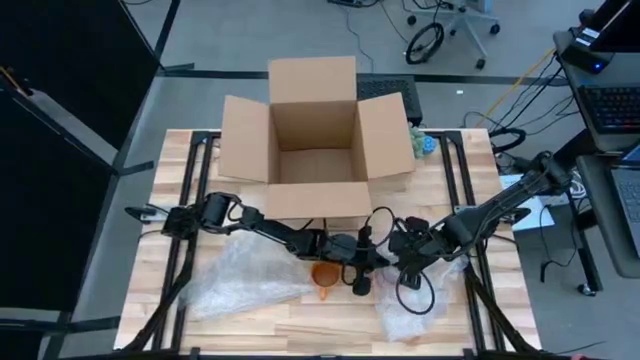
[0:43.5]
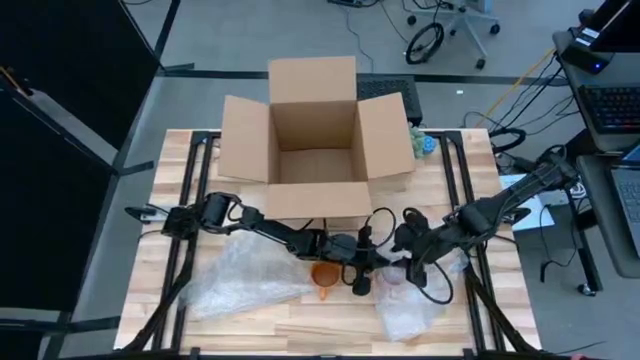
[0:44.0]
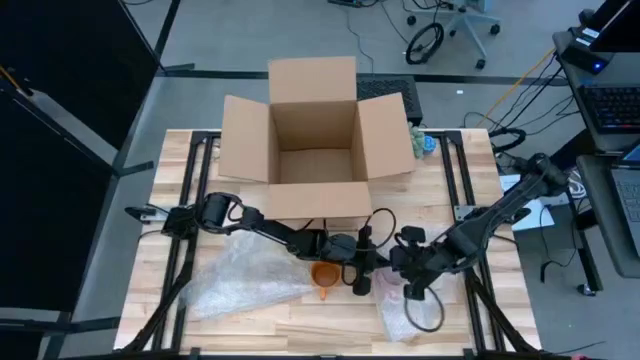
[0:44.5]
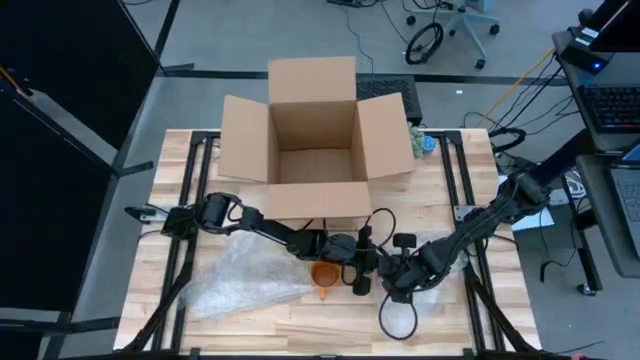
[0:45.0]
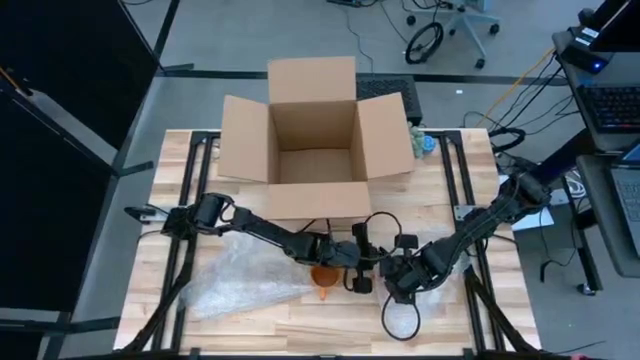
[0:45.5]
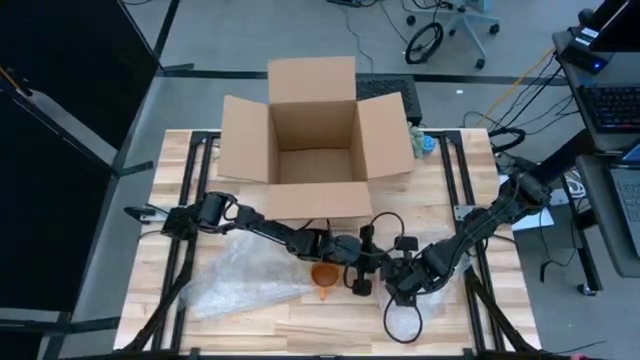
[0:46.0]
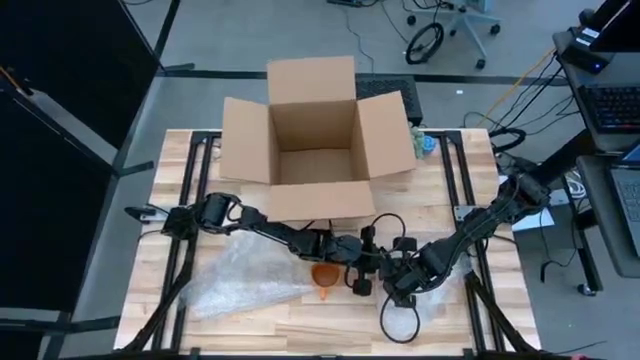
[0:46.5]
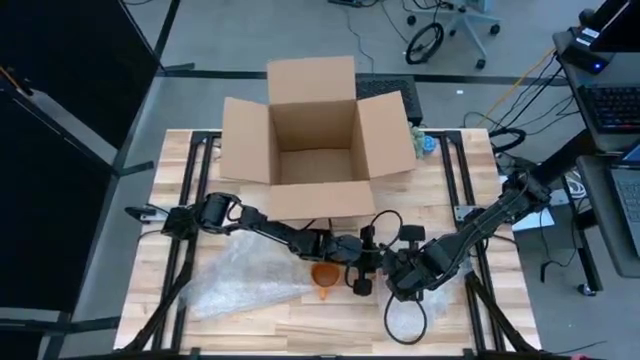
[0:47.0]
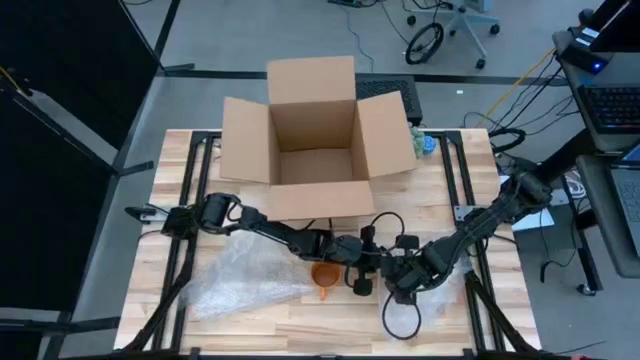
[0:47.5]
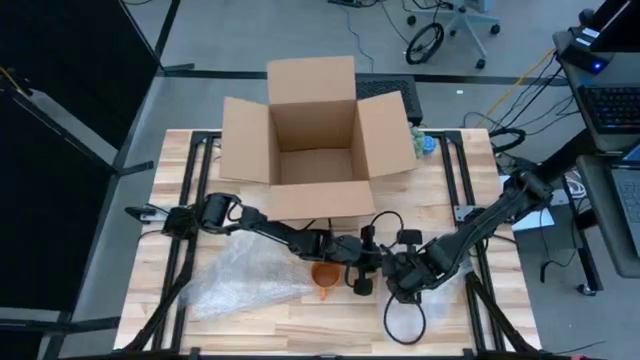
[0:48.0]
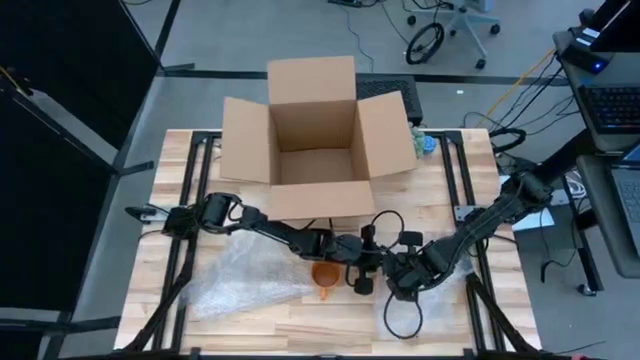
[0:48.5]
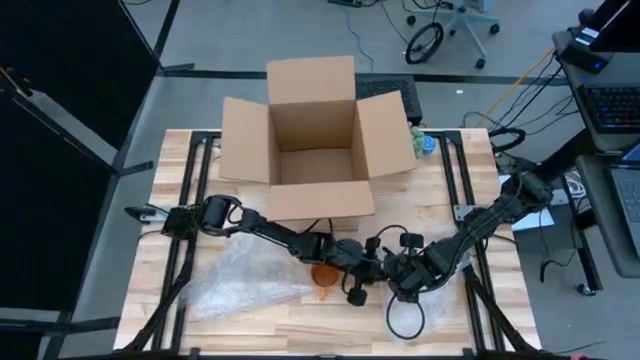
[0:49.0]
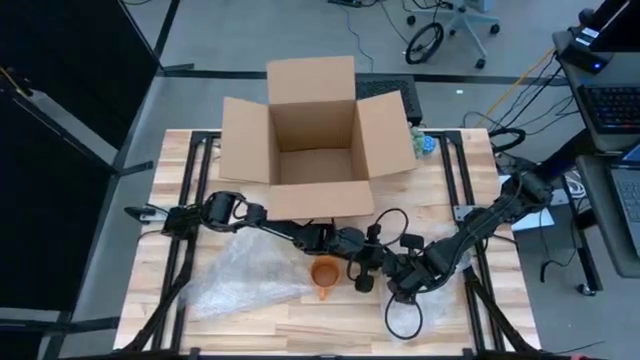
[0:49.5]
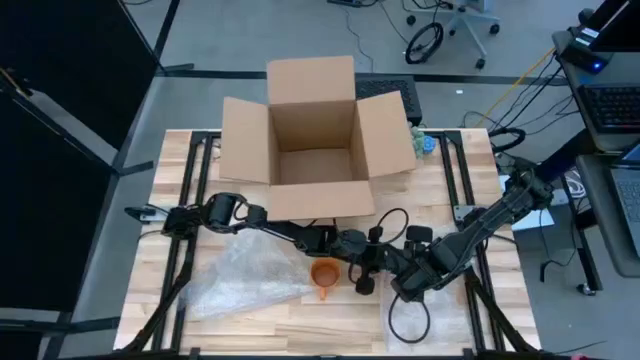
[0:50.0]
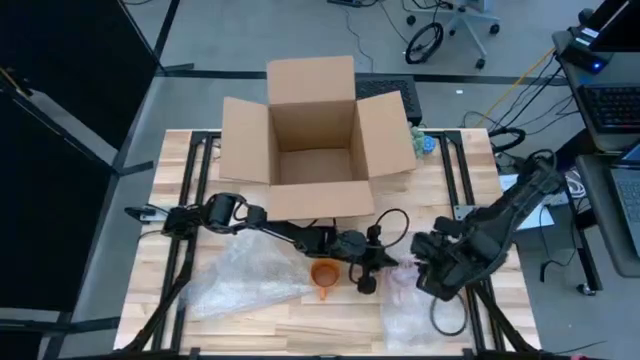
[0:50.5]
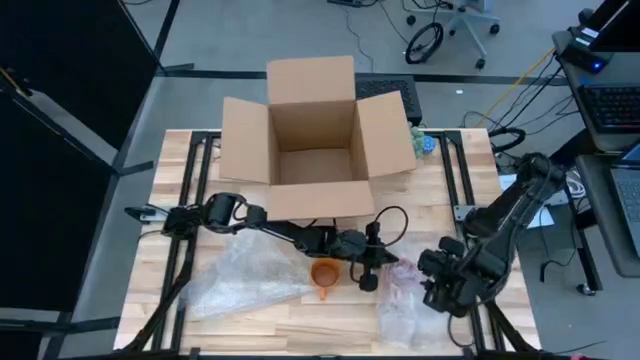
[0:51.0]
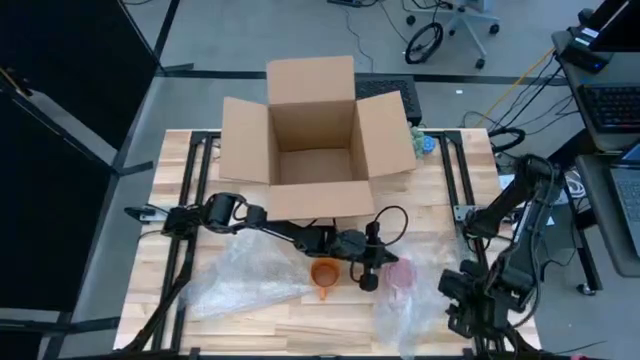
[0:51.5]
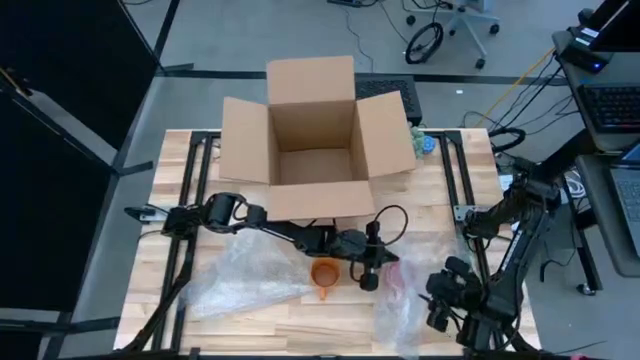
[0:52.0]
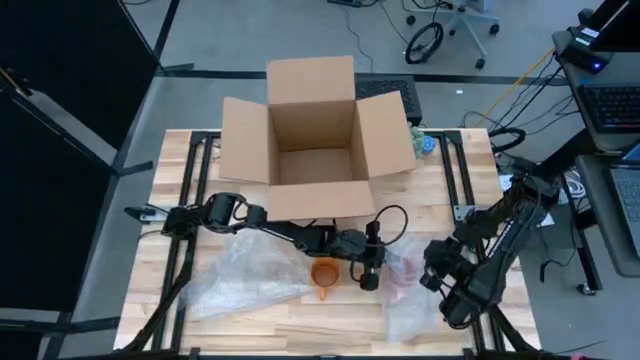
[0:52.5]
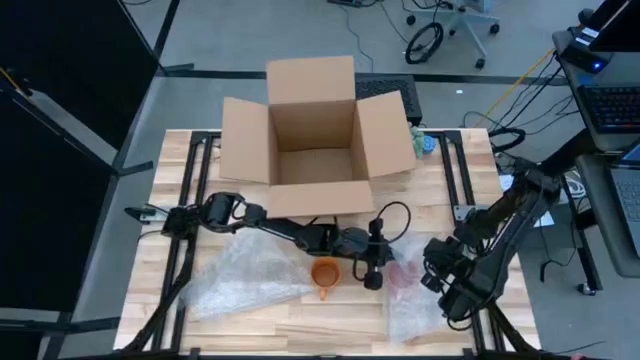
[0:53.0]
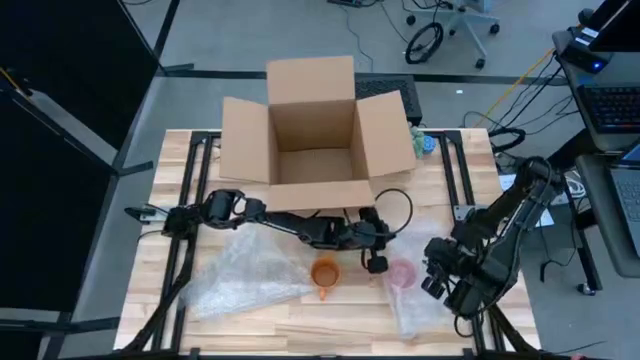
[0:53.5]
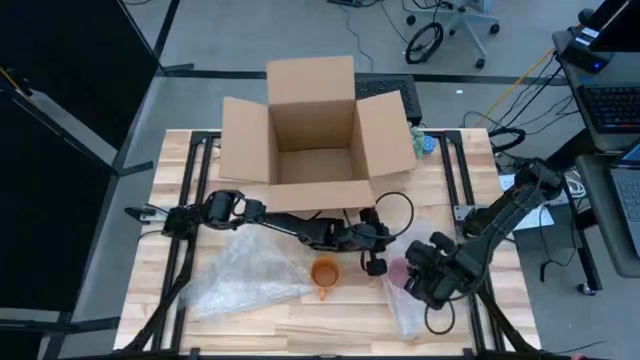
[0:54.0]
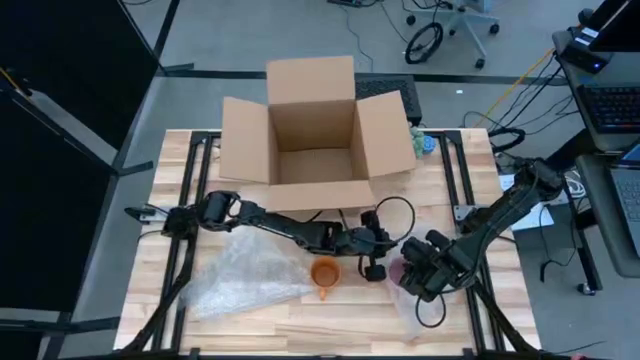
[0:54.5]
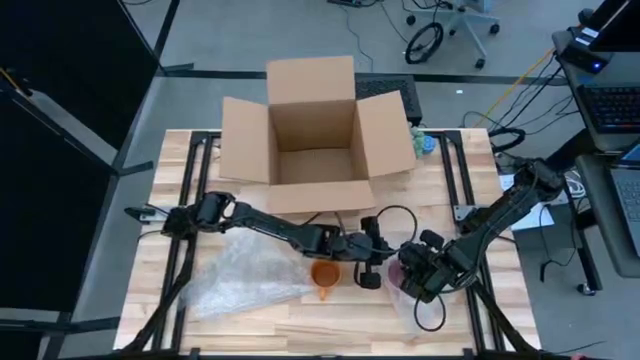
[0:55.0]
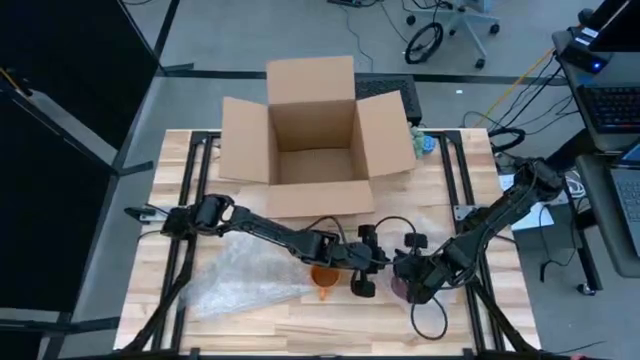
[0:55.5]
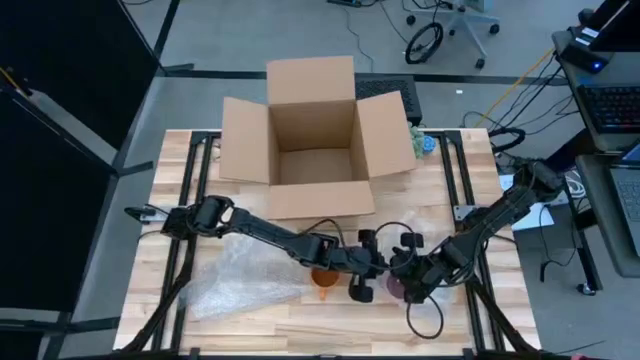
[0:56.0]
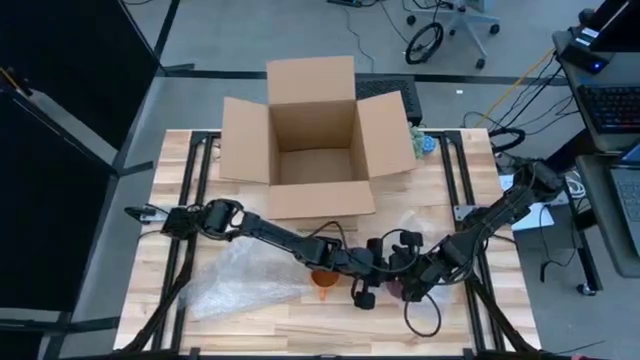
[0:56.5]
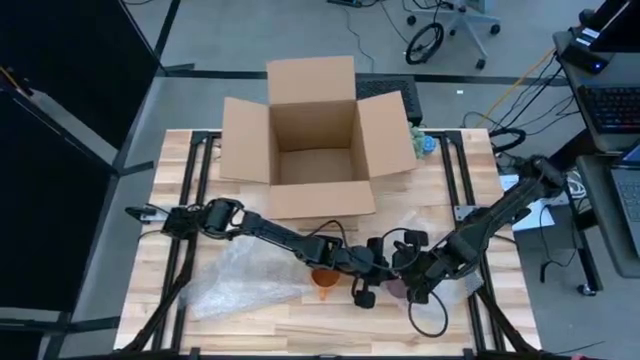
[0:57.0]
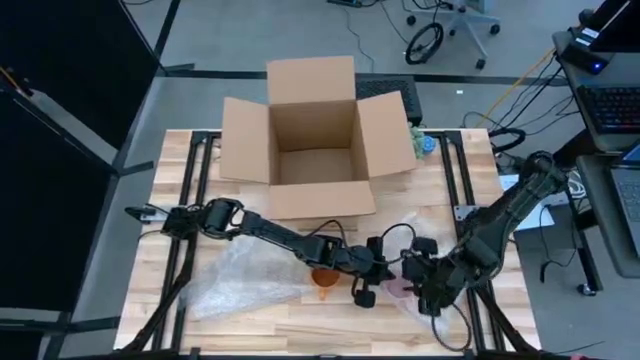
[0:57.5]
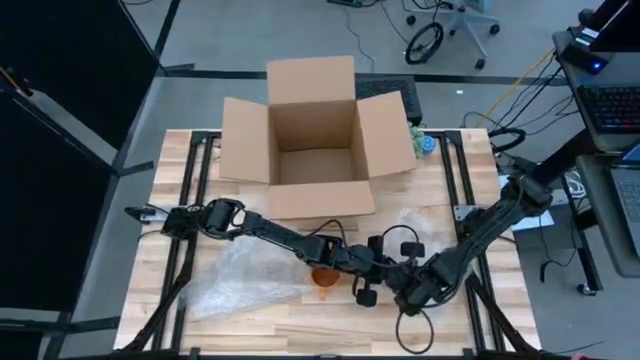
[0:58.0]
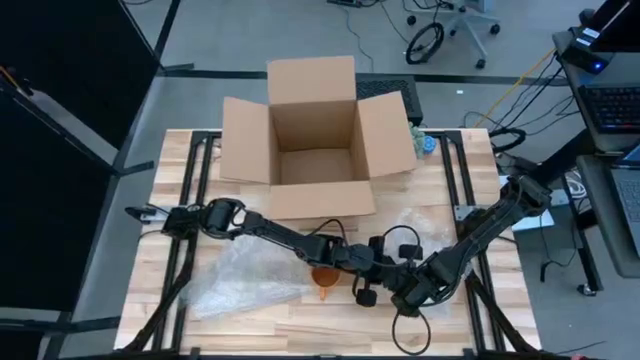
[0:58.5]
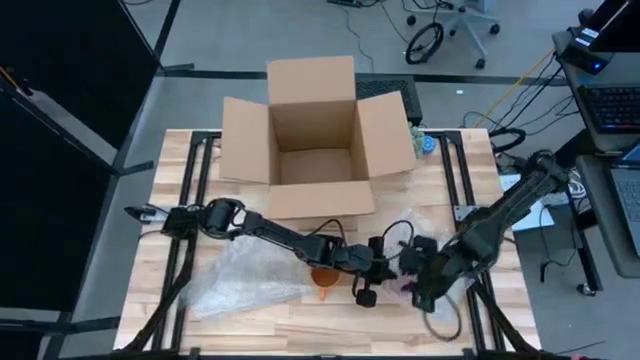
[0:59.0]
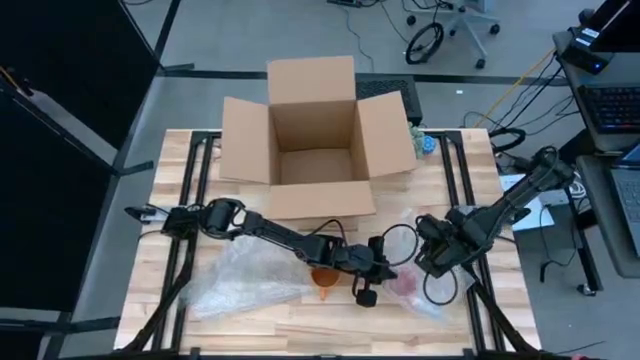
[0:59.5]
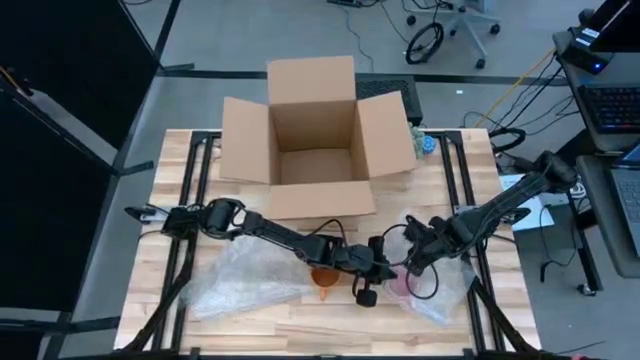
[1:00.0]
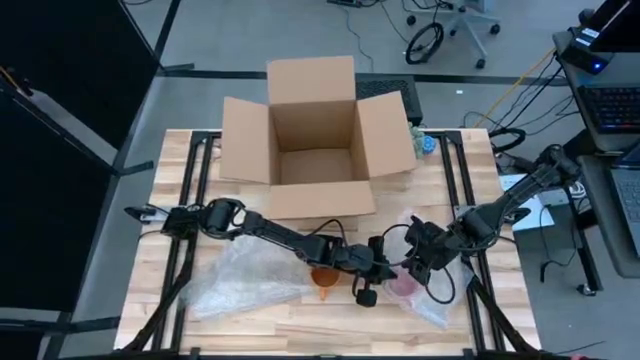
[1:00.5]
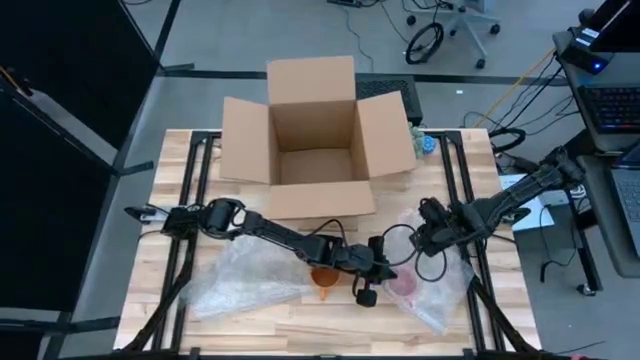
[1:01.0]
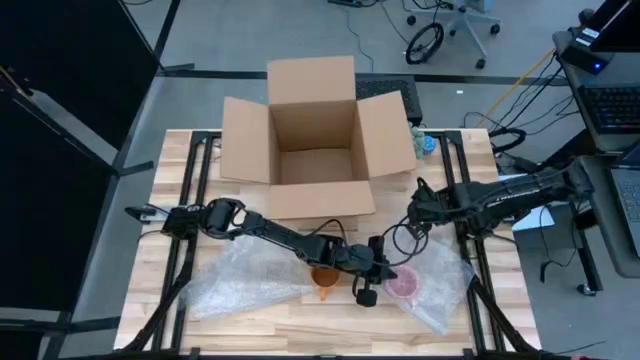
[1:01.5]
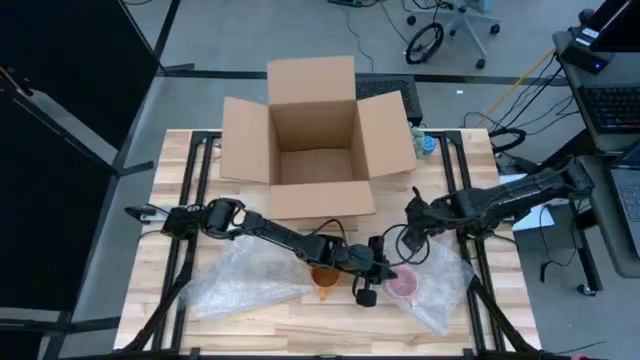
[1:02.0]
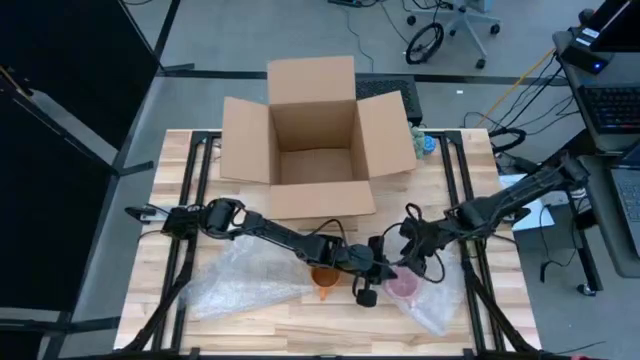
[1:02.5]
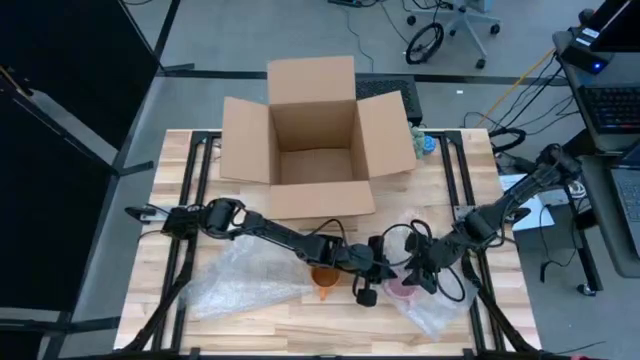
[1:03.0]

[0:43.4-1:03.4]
Task: wrap mug
Wrap the pink mug with the transparent bubble wrap
